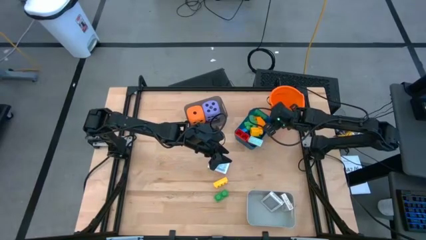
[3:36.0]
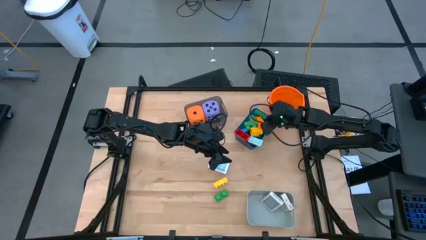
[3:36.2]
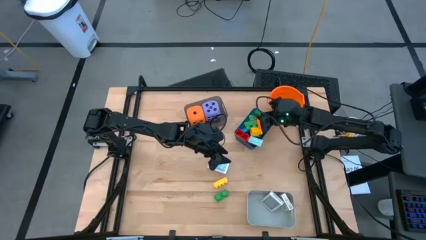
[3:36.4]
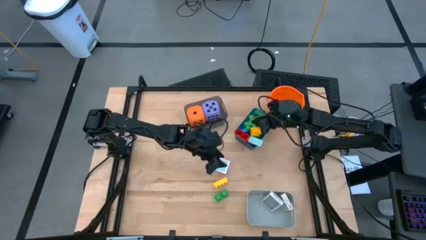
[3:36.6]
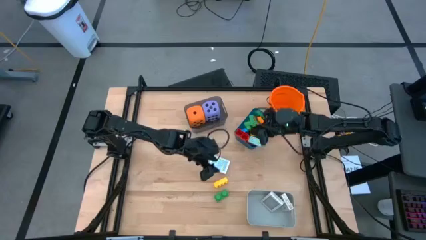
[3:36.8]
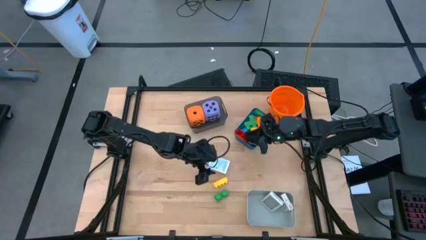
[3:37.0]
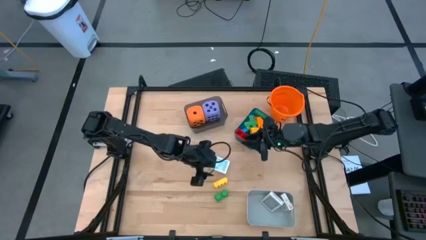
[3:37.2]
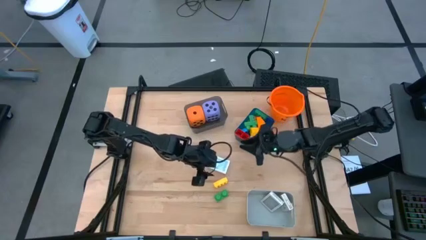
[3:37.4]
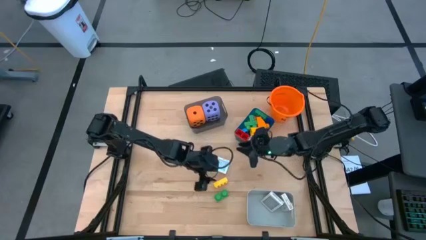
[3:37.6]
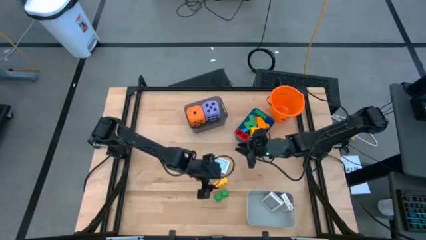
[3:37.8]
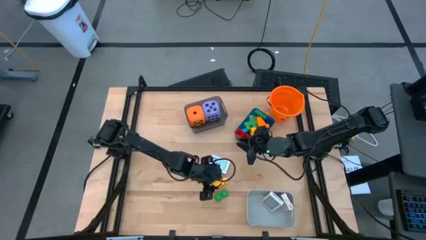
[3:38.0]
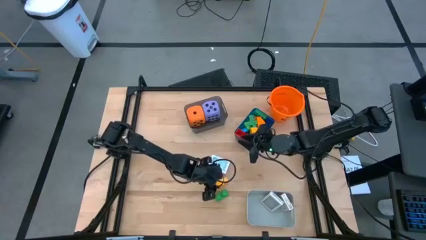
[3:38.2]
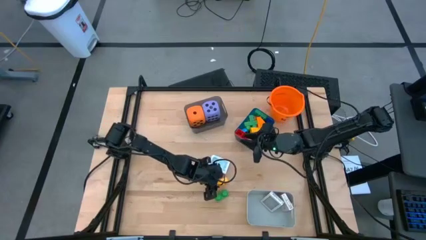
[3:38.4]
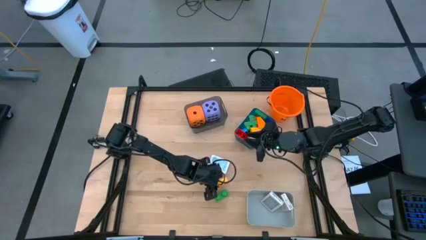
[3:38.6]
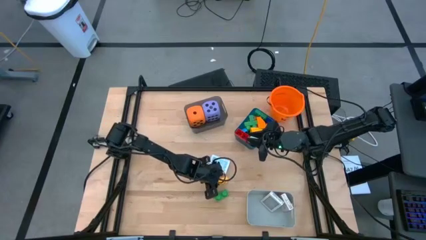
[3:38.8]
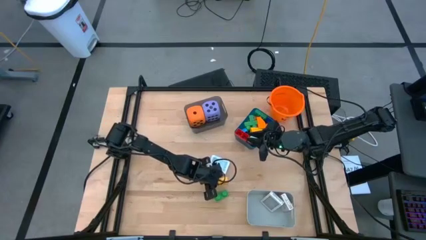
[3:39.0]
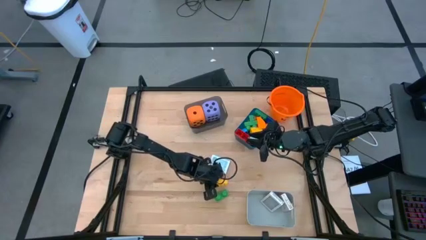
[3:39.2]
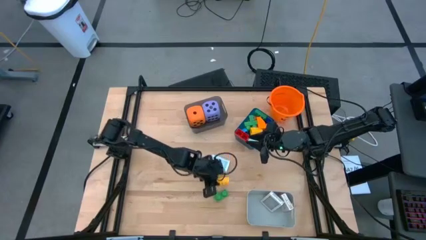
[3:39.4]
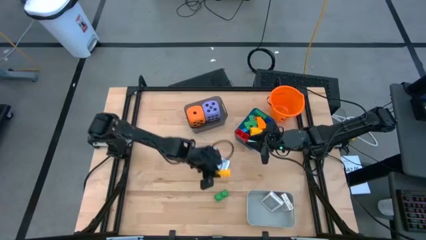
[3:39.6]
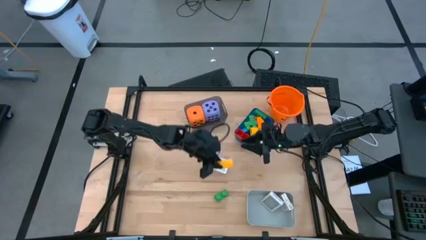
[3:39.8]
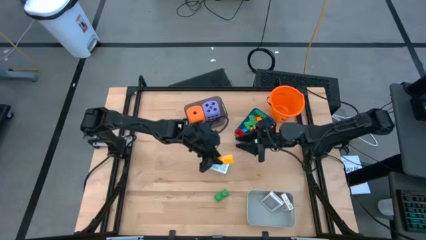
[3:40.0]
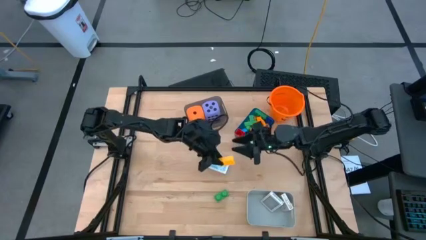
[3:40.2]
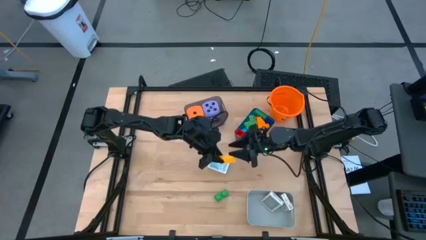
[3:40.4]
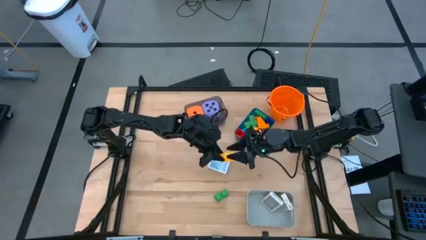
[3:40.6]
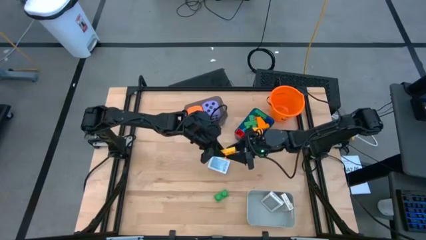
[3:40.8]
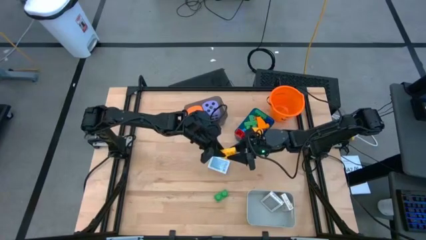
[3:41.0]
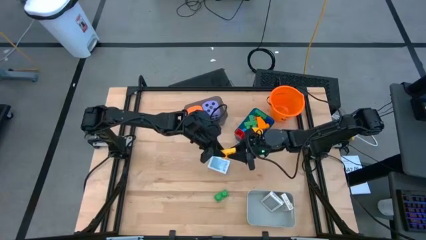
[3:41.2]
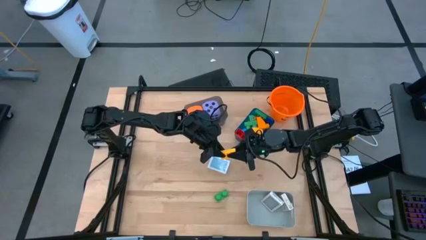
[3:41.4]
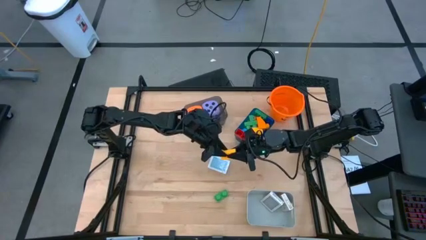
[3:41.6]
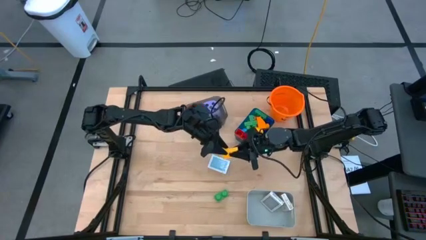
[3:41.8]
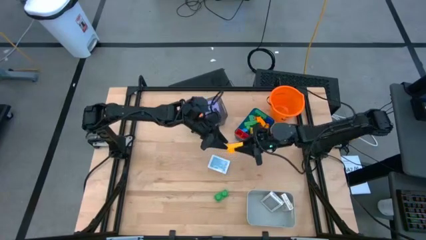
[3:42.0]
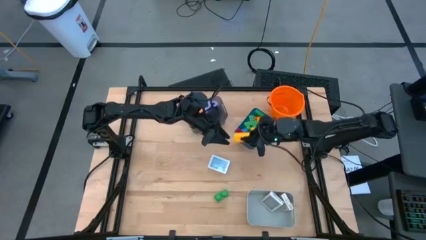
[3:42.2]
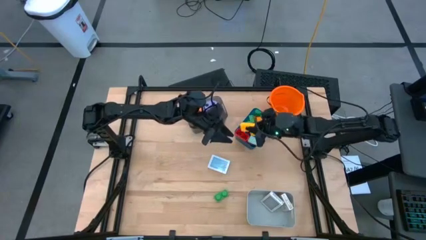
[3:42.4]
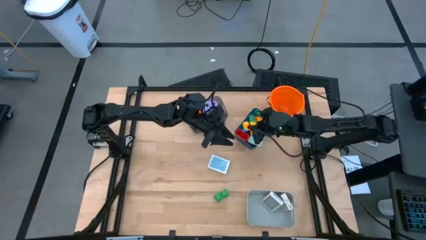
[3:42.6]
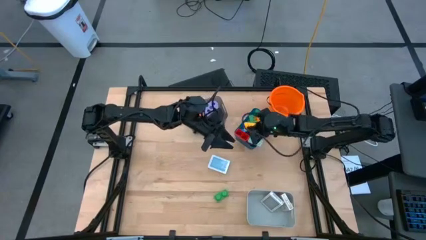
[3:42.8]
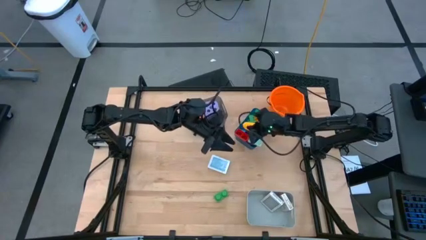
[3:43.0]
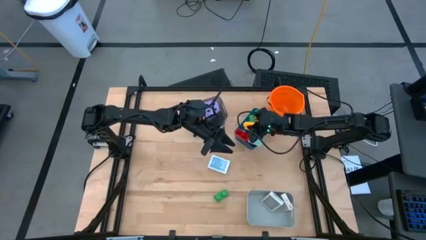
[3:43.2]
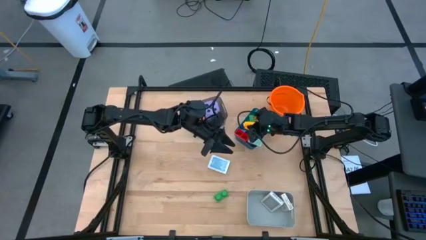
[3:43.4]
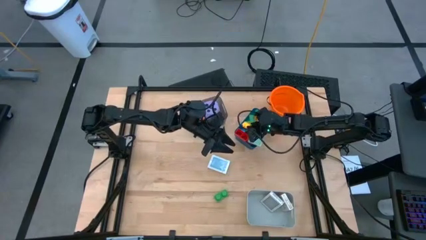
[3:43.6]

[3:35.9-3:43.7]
Task: Pick & Place Toys
Put the yellow game piece into the blue bin

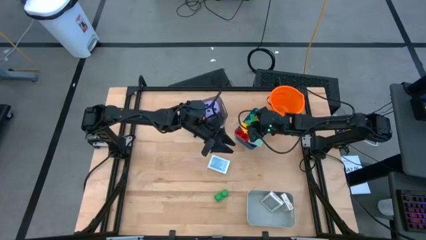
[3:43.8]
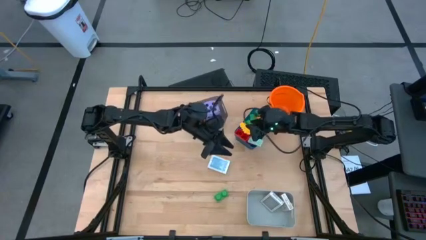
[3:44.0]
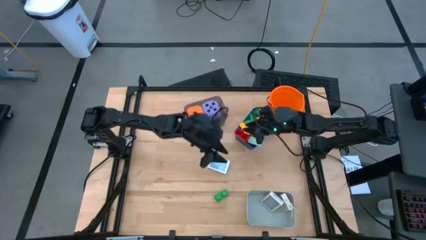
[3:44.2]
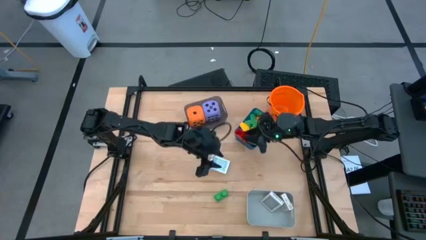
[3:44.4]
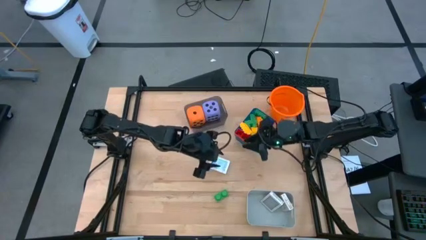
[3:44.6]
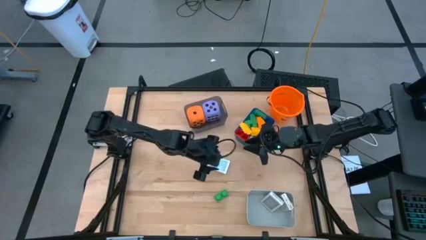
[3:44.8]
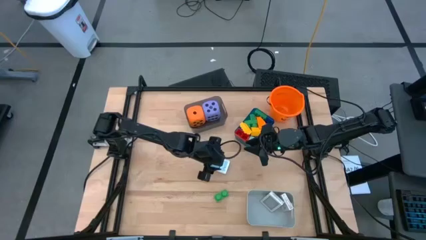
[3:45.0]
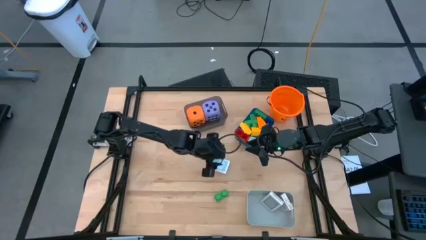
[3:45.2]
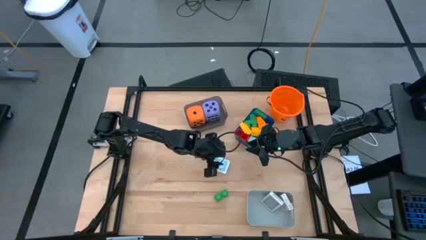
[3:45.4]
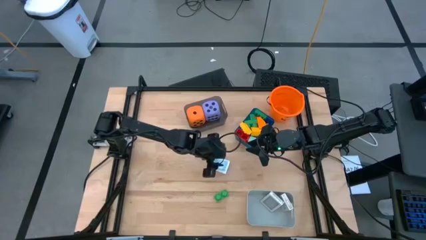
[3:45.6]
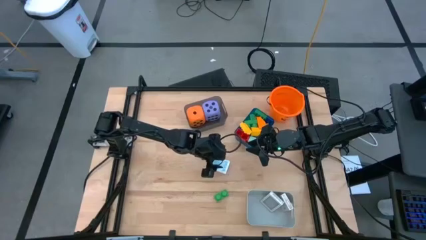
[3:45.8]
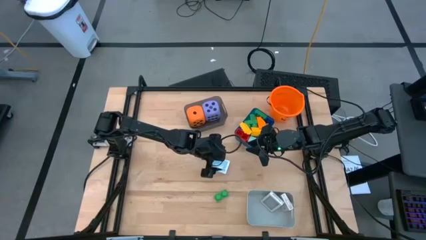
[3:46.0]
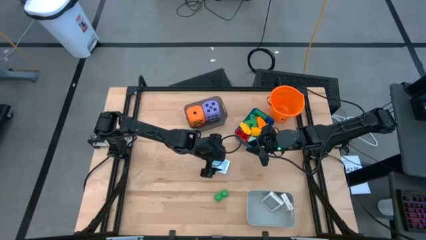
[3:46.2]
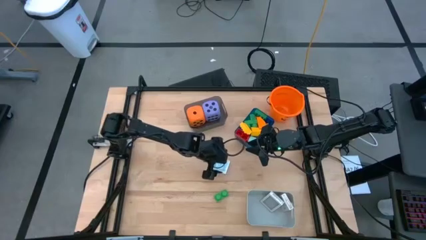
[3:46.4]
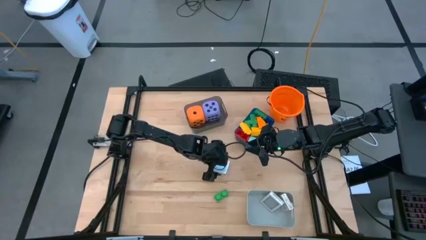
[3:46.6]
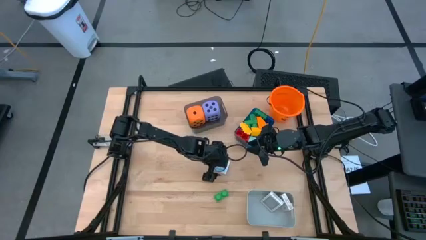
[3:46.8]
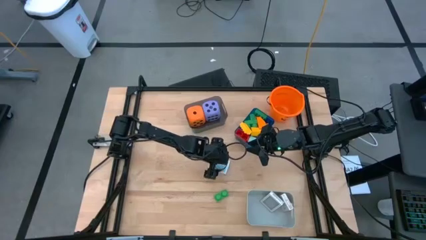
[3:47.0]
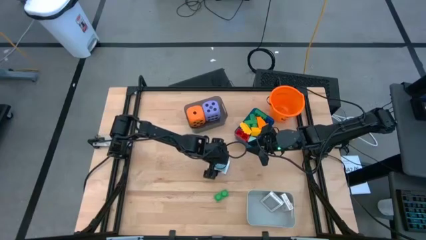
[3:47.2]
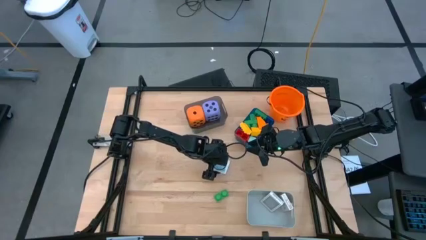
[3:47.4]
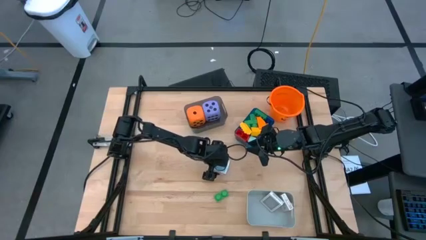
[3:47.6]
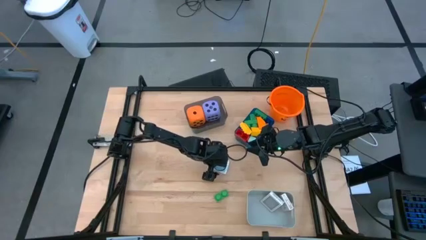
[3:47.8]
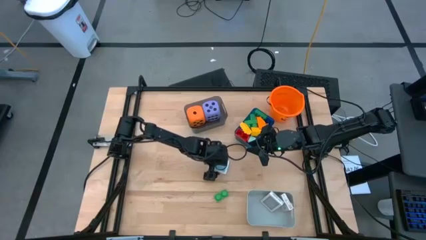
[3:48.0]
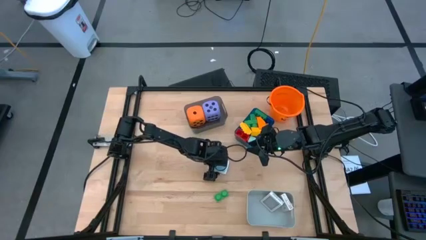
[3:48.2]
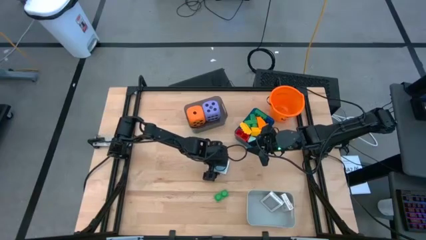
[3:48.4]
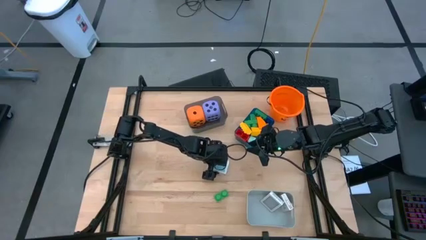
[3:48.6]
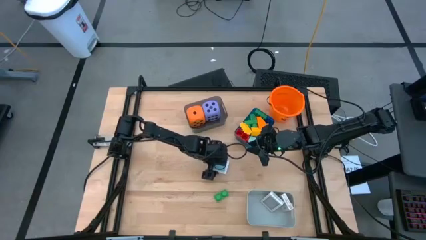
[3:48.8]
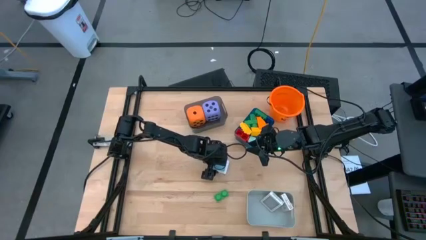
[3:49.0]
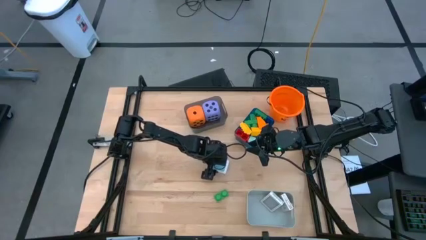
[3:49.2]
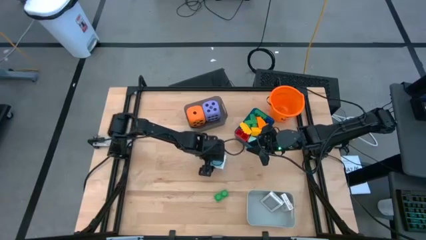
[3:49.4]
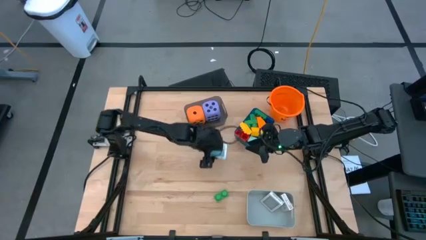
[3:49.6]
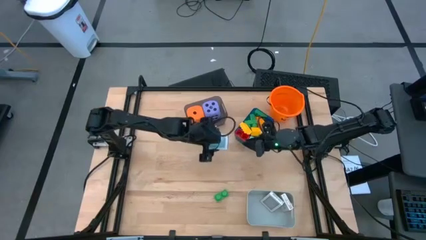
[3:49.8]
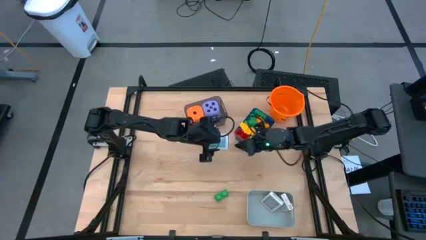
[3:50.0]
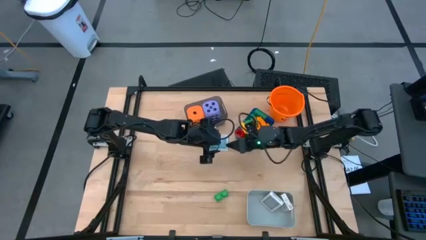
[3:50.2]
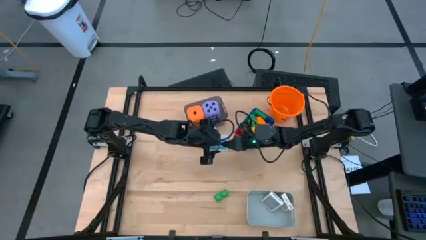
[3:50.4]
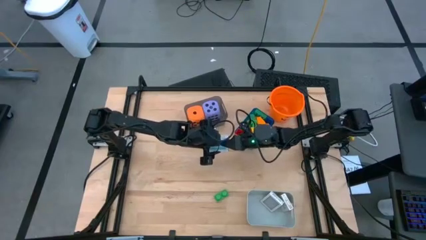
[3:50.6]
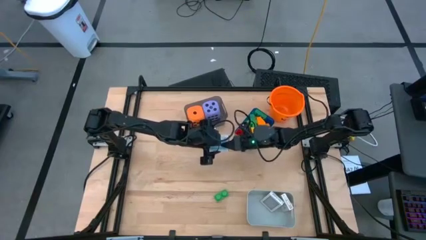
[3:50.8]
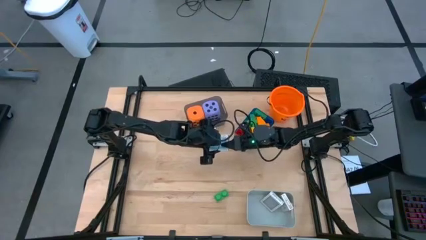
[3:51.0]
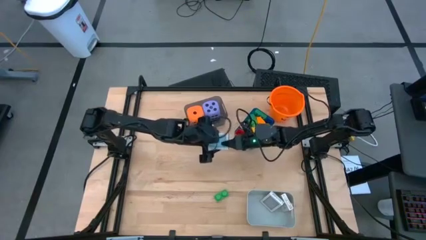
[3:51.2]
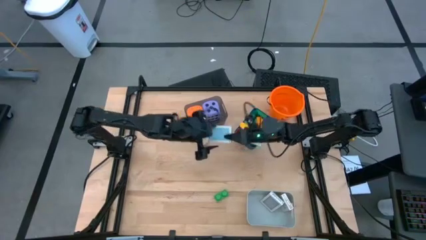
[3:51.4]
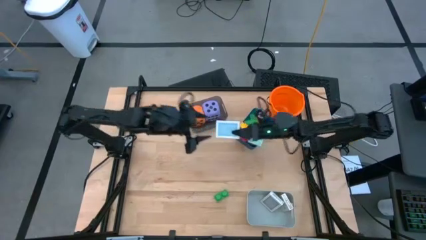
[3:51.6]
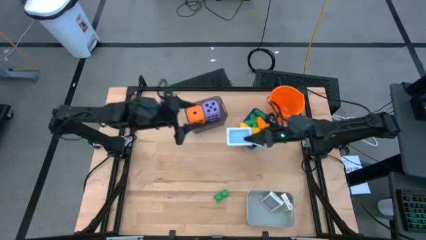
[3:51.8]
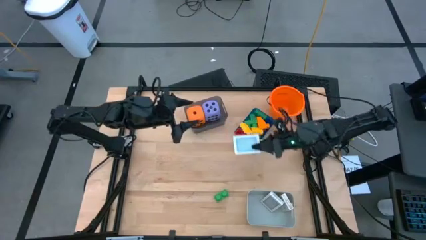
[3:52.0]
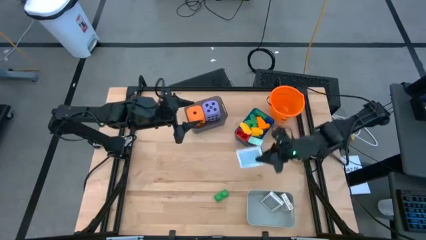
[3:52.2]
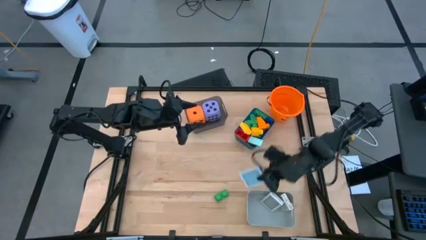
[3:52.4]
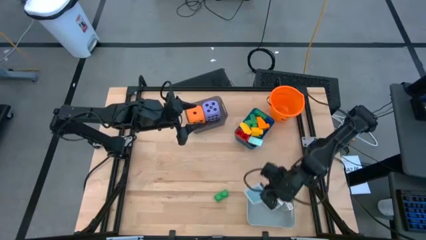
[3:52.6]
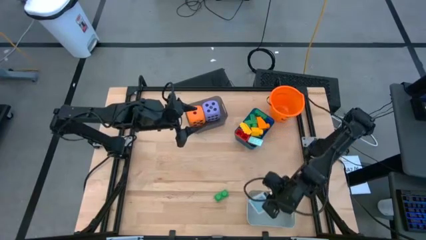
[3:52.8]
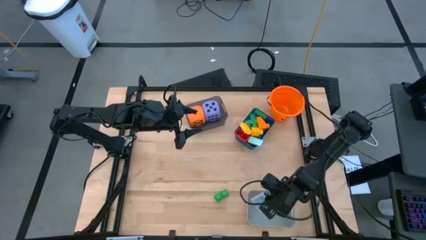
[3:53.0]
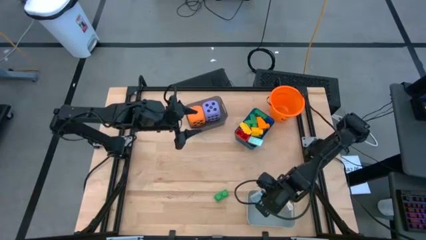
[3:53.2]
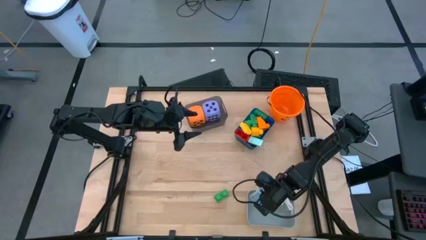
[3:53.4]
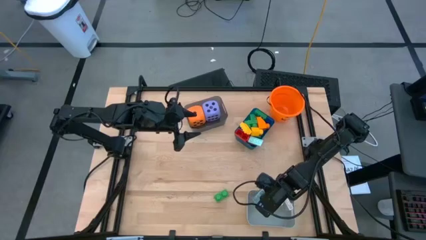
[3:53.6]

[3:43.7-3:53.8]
Put the blue deck of cards into the gray bin
